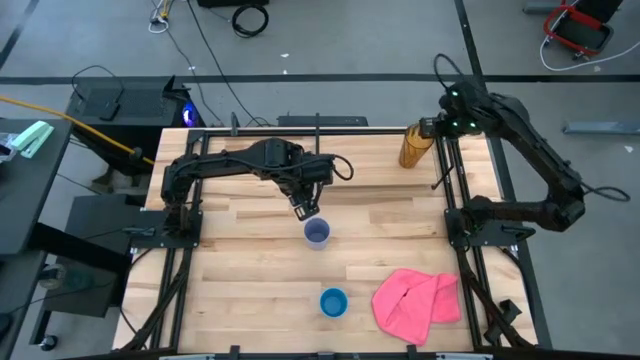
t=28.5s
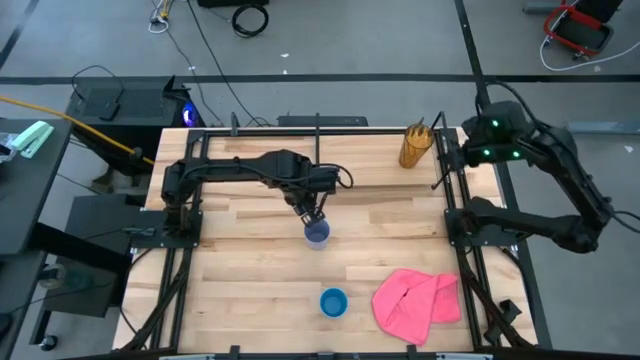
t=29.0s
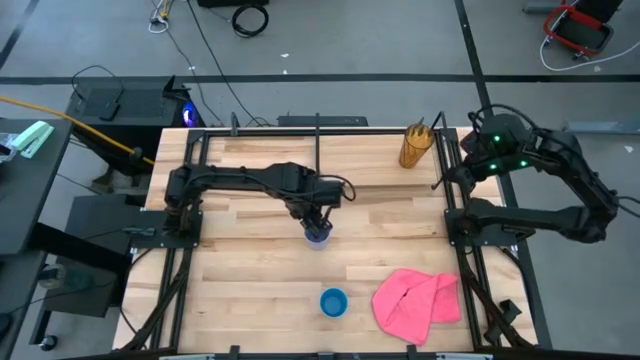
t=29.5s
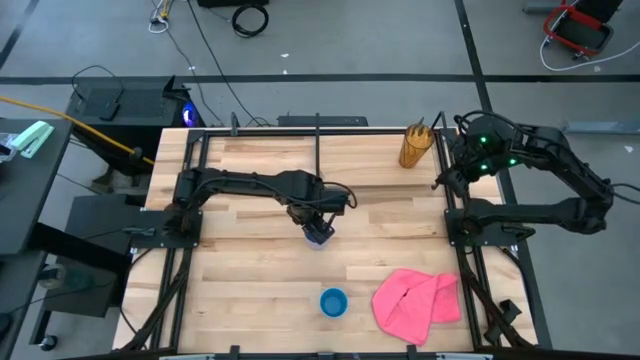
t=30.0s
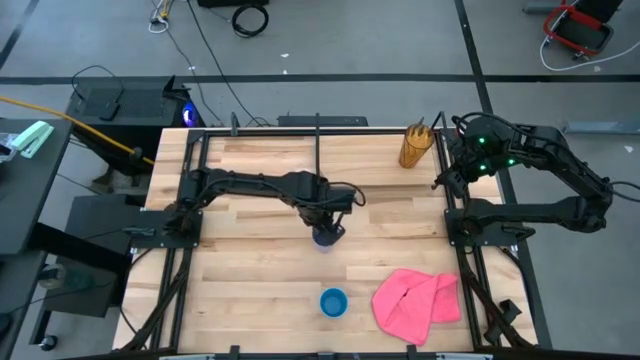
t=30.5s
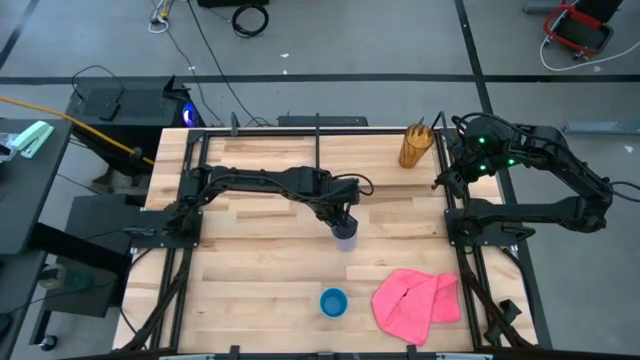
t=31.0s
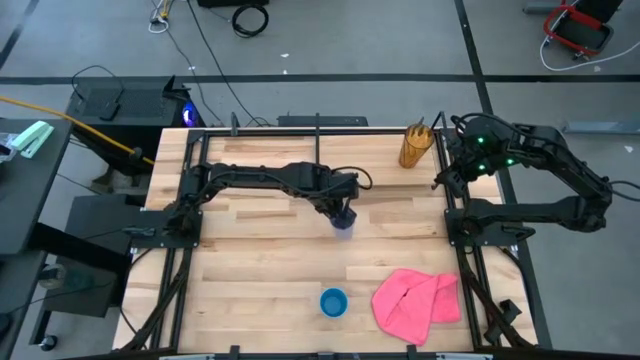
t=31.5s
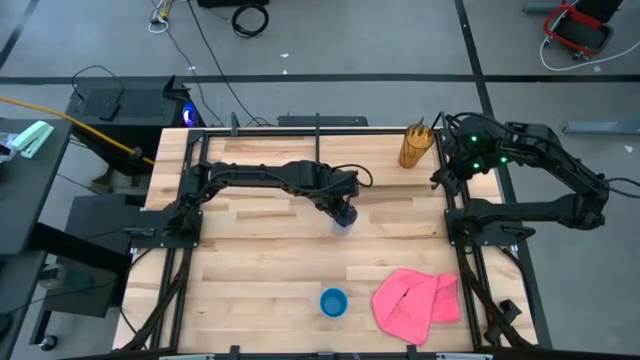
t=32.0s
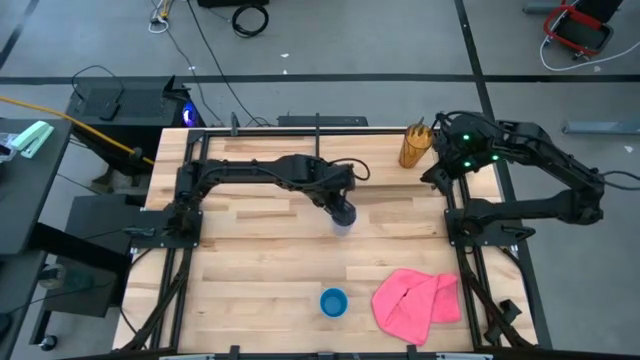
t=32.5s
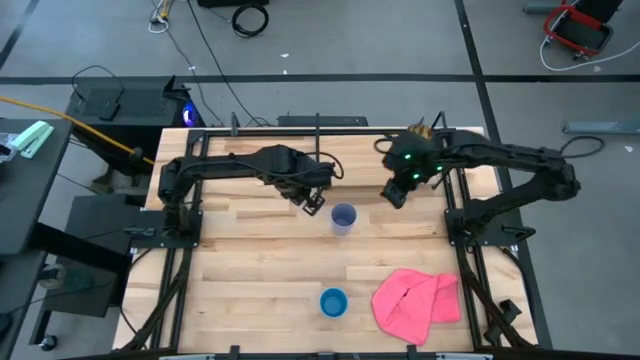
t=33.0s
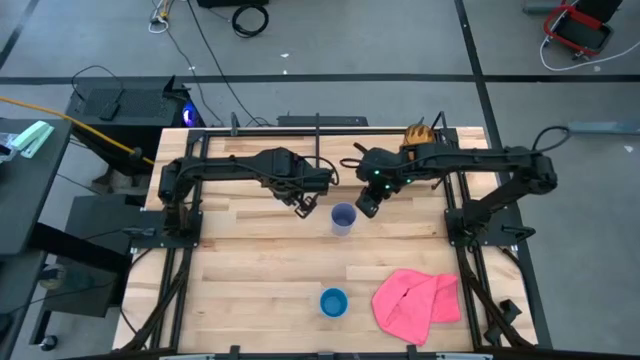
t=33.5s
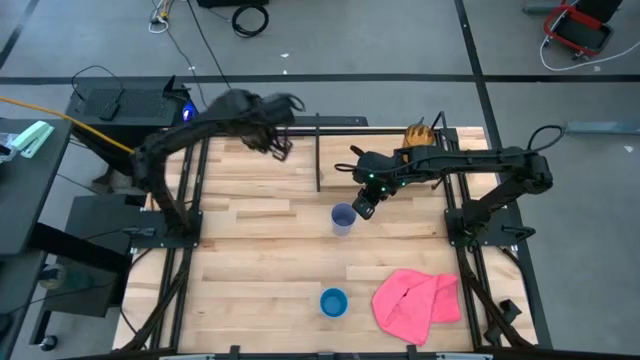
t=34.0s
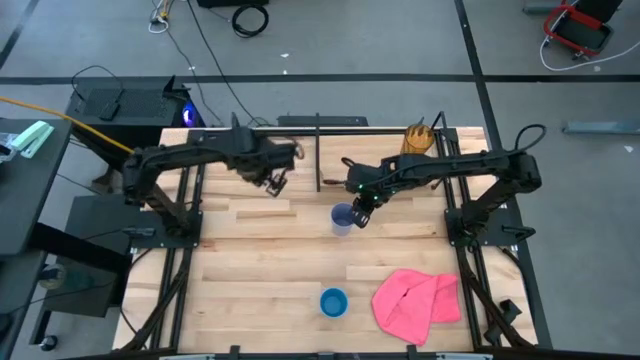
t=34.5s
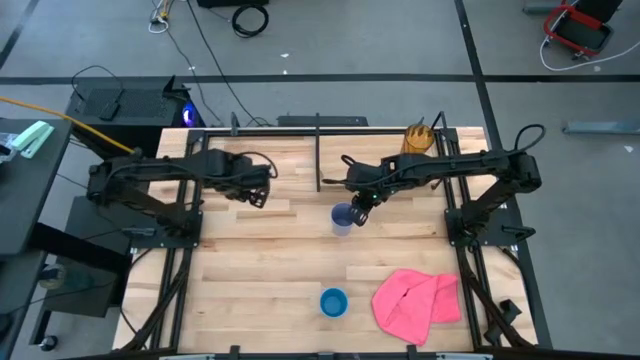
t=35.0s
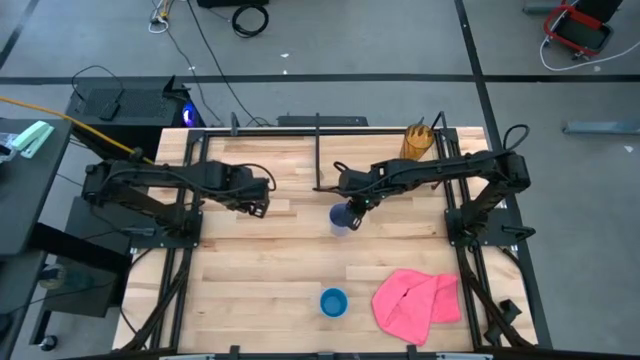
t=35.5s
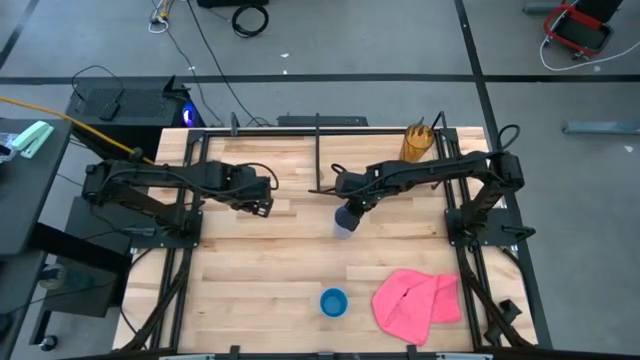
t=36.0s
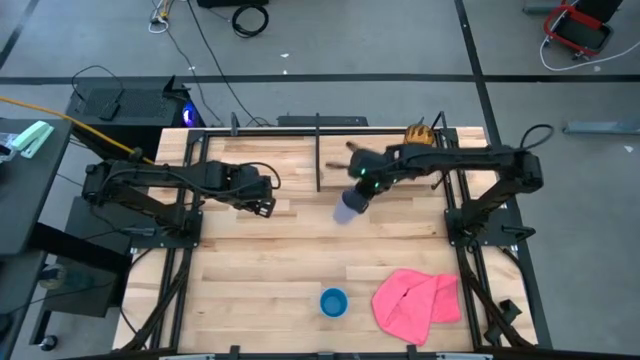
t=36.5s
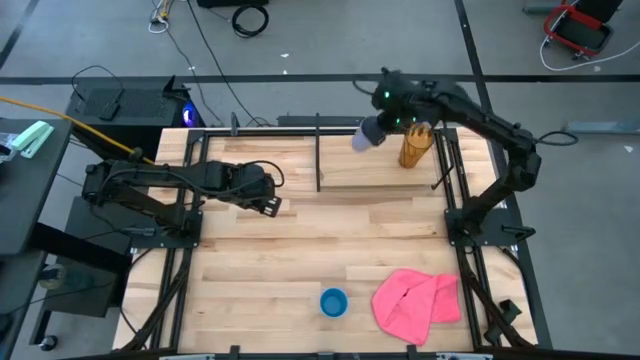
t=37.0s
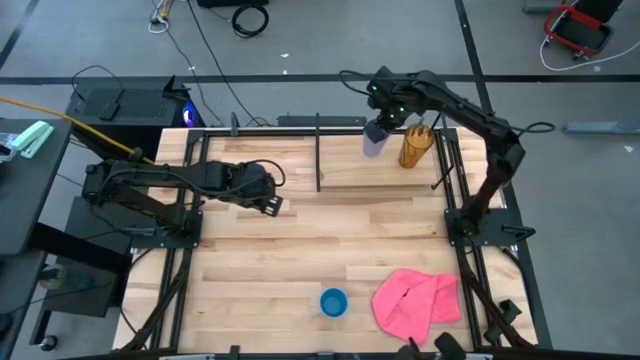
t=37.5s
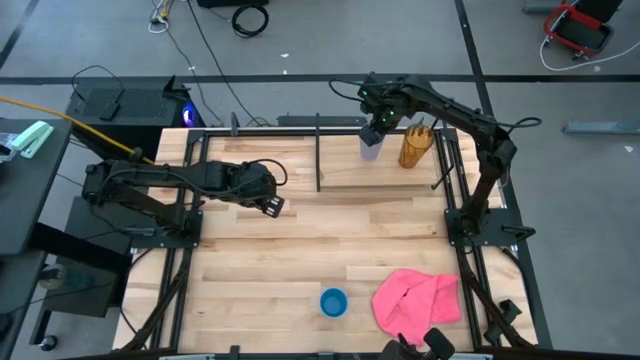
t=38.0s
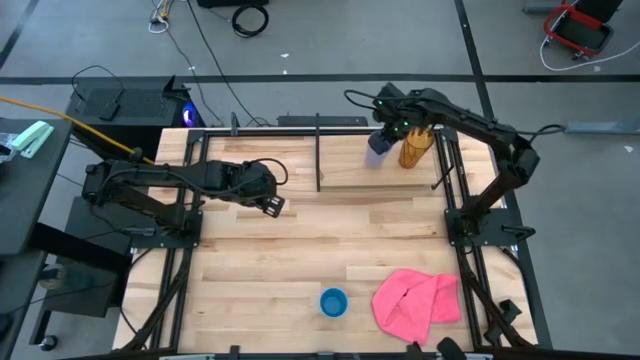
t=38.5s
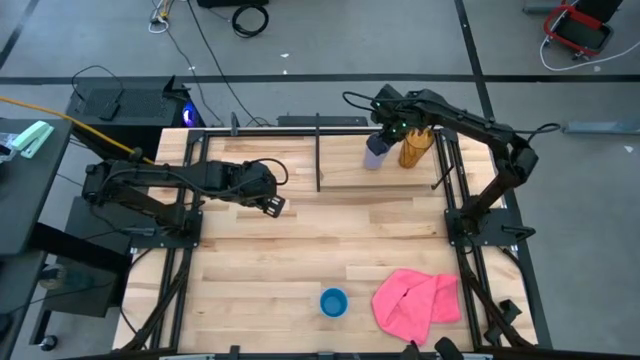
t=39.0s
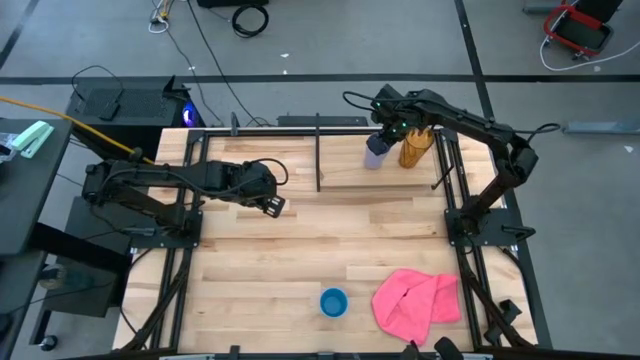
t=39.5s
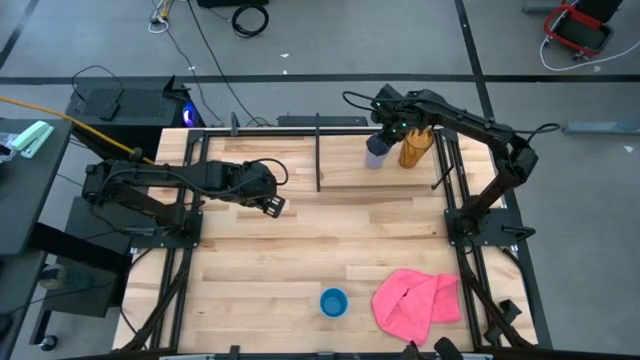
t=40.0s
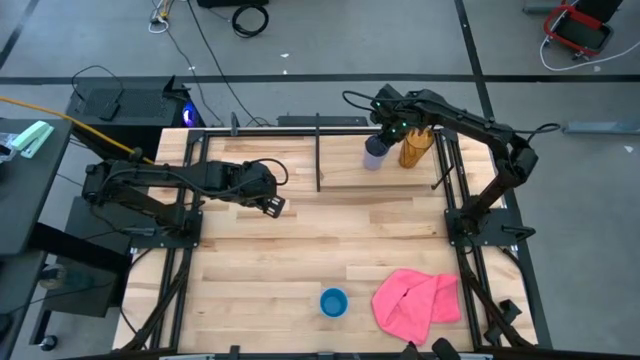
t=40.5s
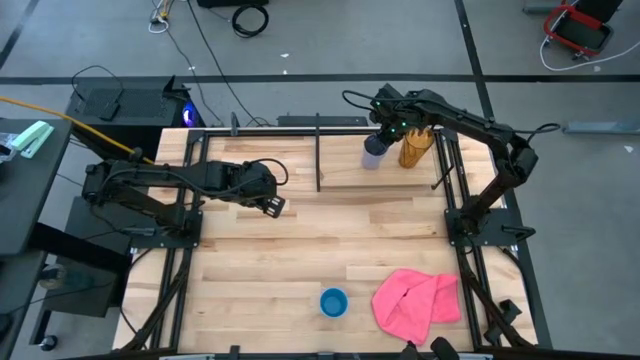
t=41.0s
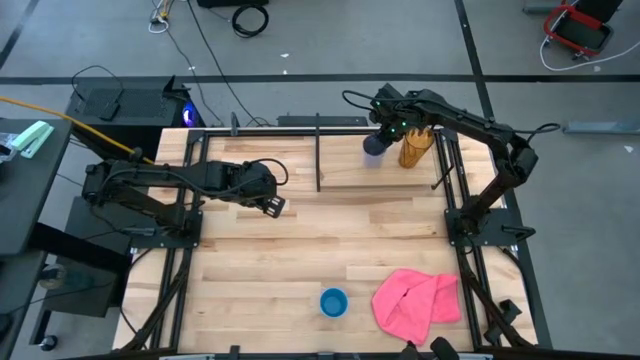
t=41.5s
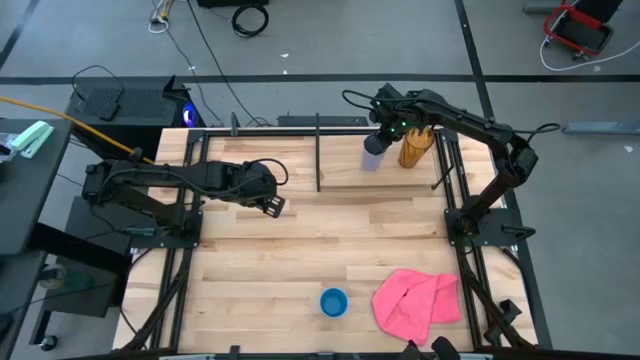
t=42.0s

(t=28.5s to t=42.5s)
Task: Stack small to large cups/mugs on shelf
Put the purple cup on the shelf

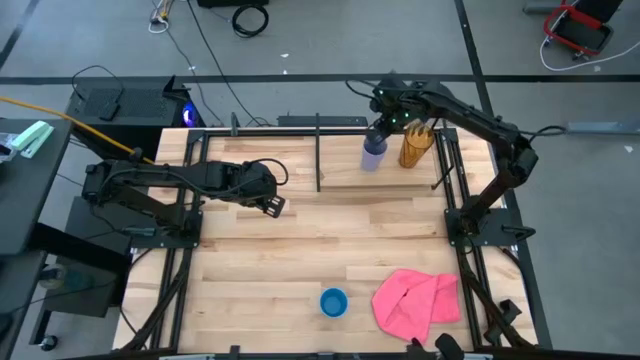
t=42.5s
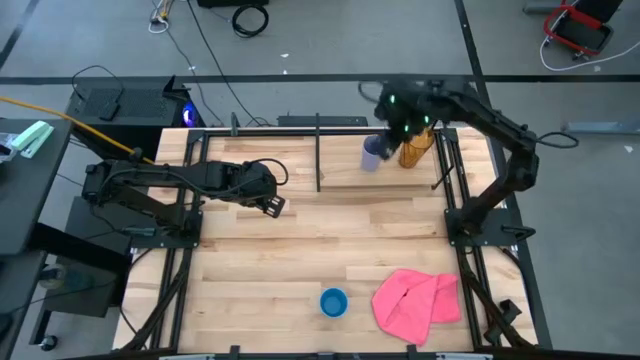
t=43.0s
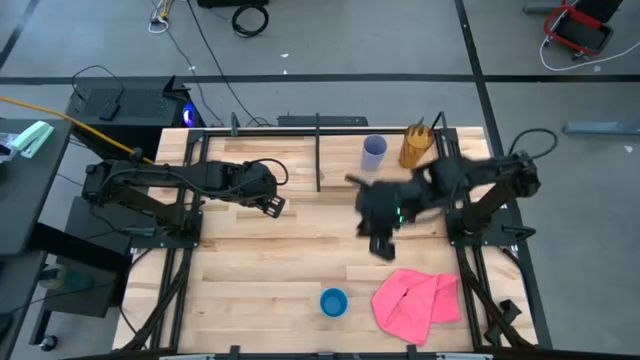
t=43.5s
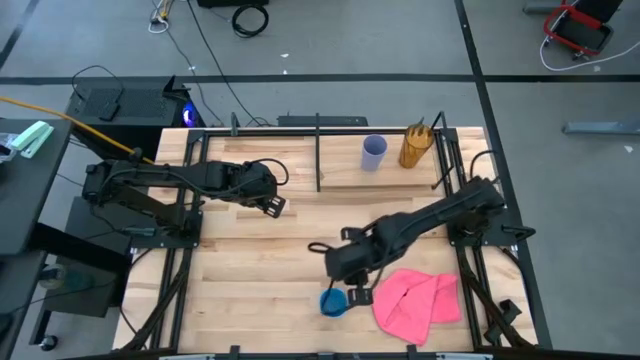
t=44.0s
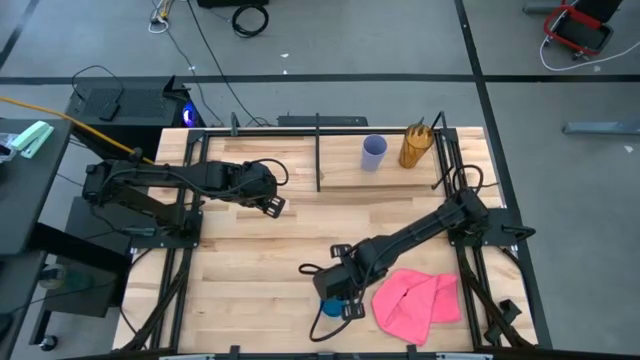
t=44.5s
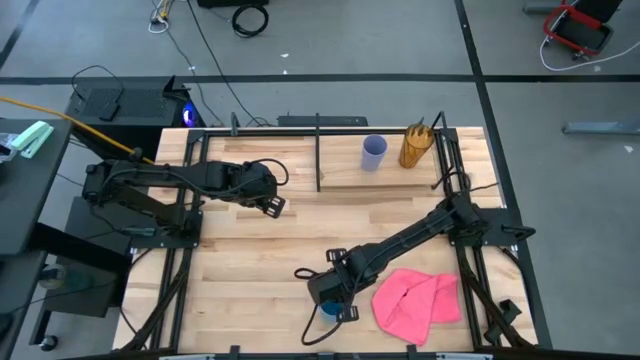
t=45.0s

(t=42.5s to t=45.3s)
Put the blue cup on the shelf

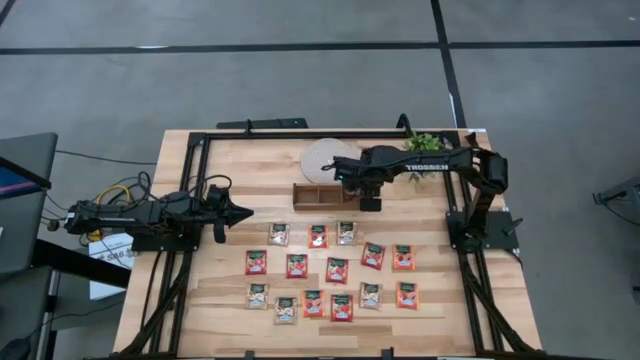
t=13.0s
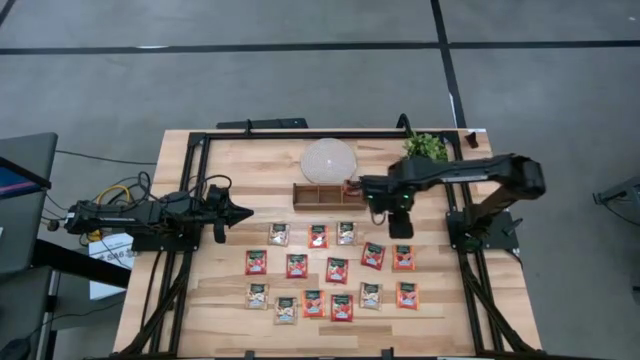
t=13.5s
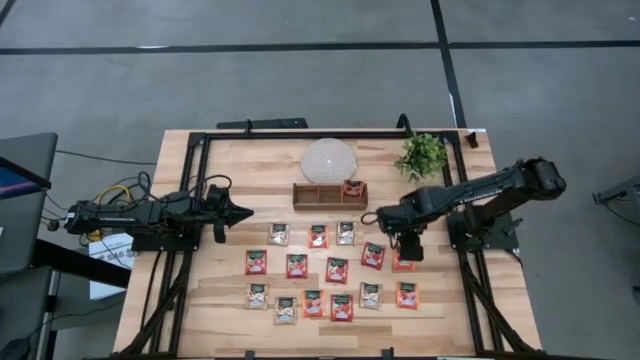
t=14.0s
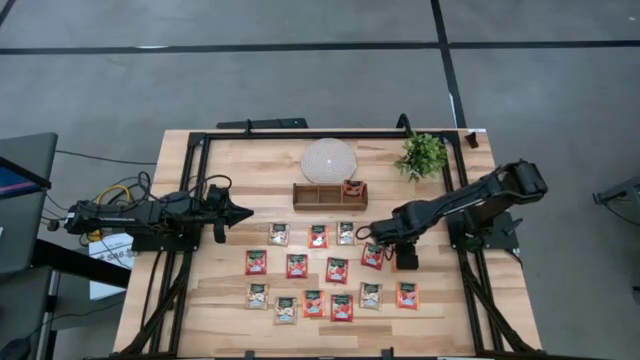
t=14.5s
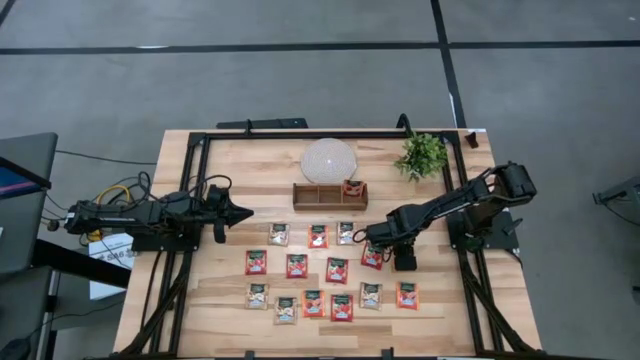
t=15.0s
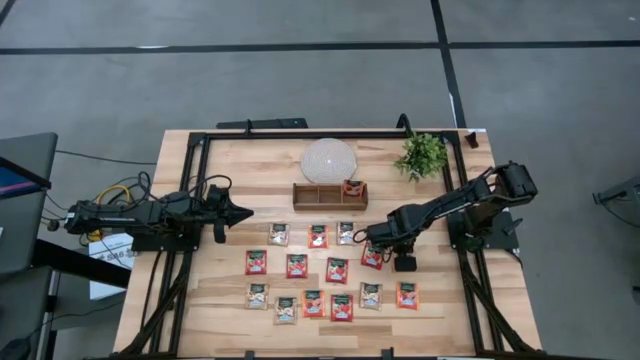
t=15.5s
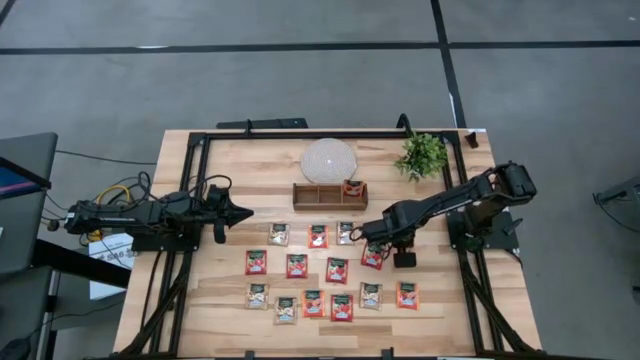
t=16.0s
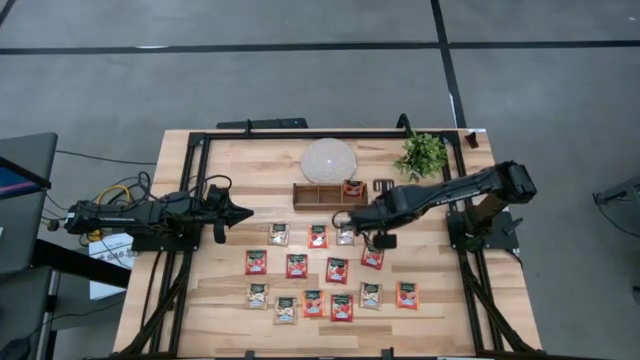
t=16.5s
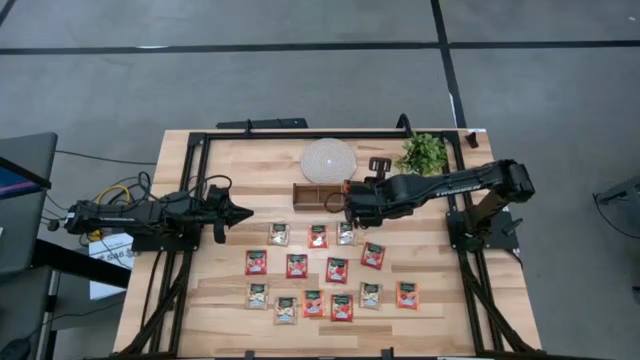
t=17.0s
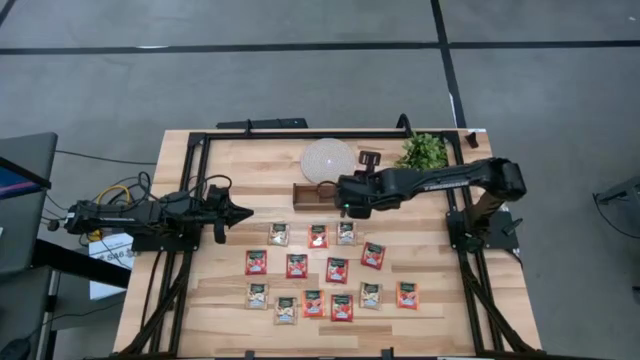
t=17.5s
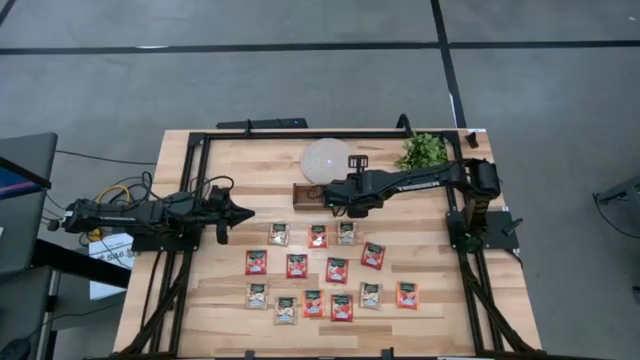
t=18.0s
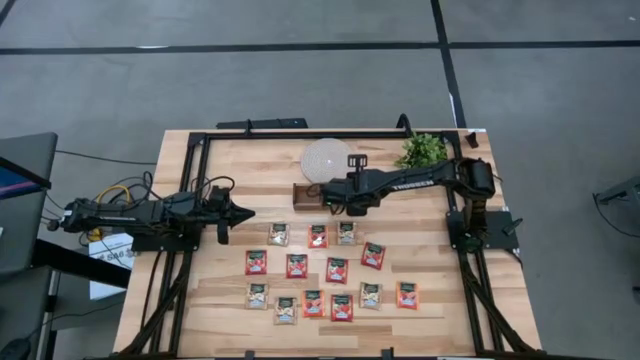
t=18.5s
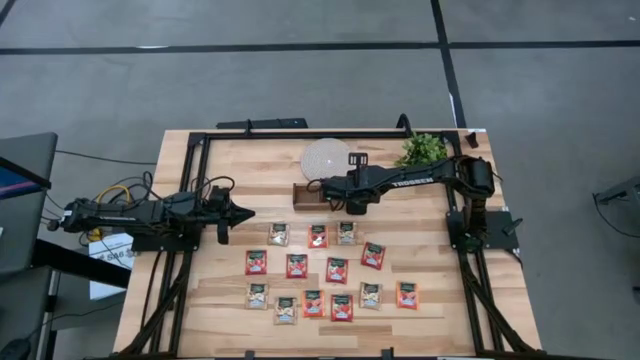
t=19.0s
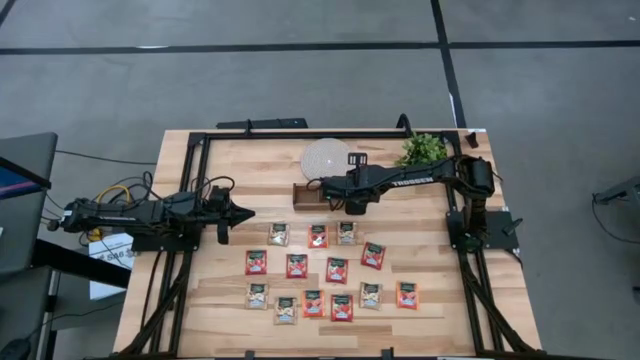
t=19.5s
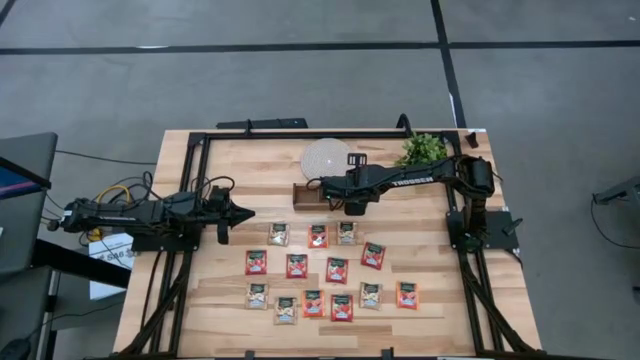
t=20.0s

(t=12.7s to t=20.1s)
Task: Pick & Place Tea
Put the orange tea bag into the right compartment of the wooden organizer
